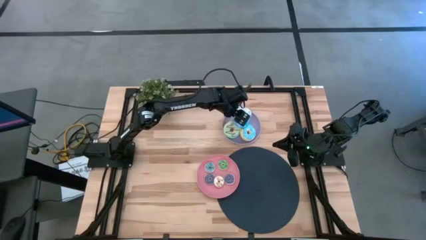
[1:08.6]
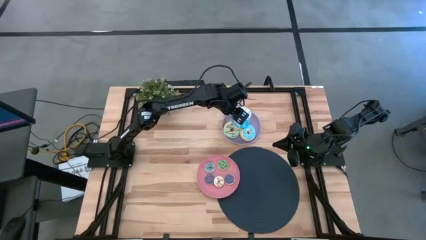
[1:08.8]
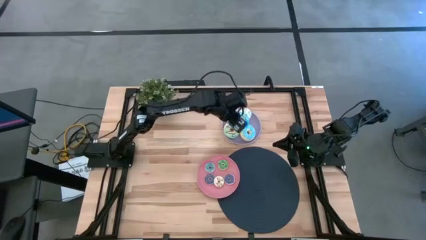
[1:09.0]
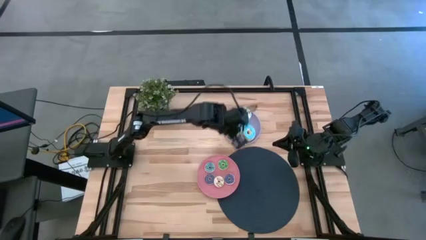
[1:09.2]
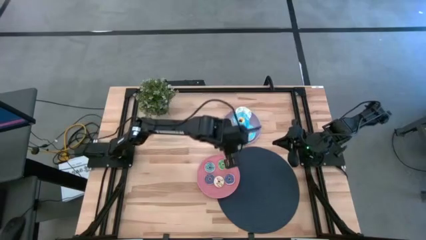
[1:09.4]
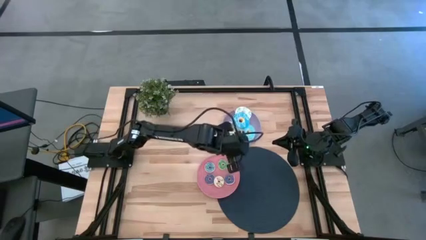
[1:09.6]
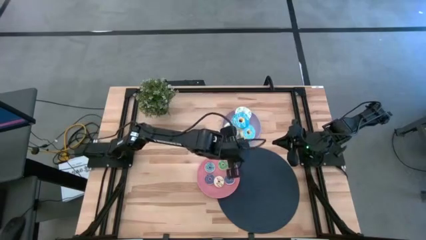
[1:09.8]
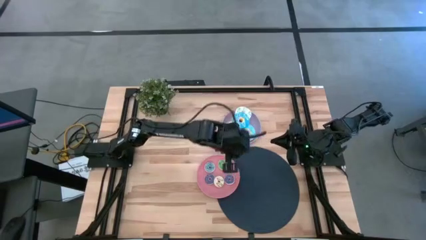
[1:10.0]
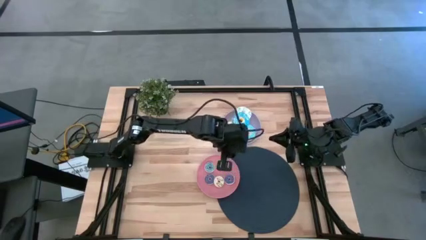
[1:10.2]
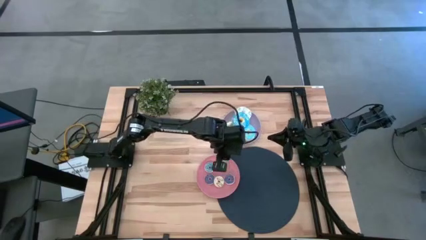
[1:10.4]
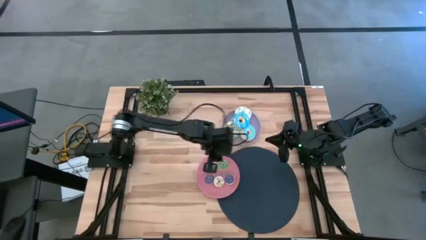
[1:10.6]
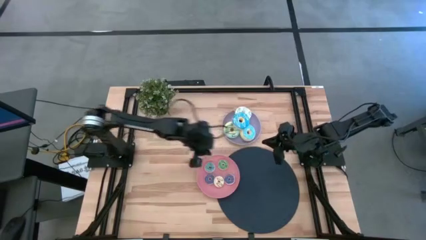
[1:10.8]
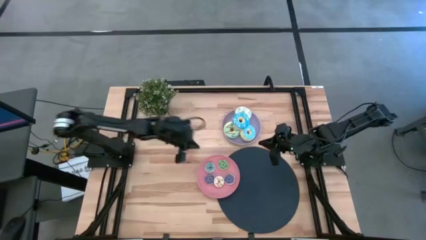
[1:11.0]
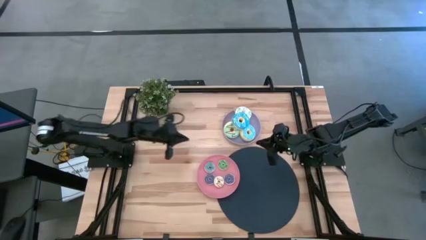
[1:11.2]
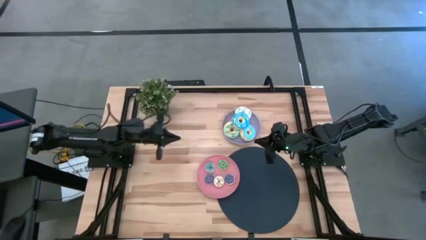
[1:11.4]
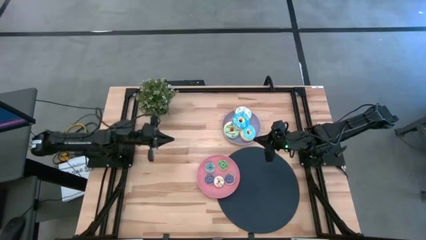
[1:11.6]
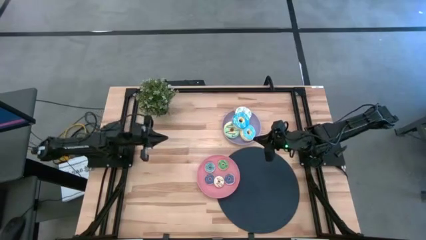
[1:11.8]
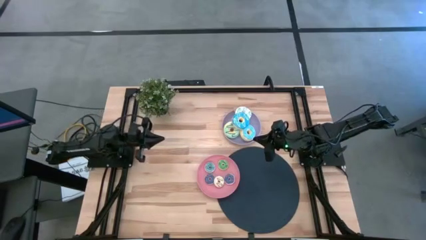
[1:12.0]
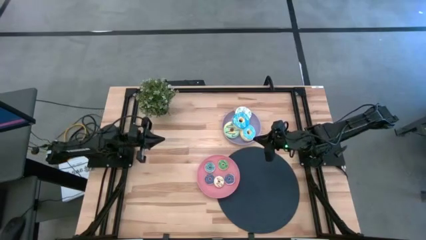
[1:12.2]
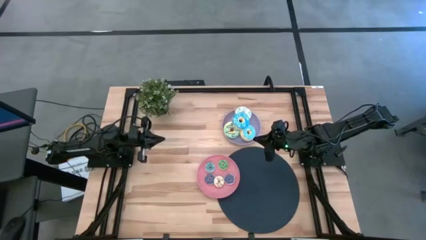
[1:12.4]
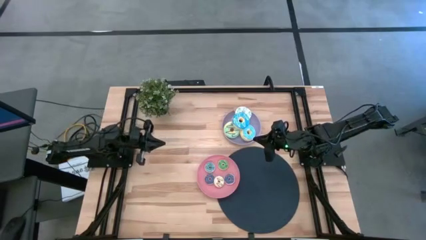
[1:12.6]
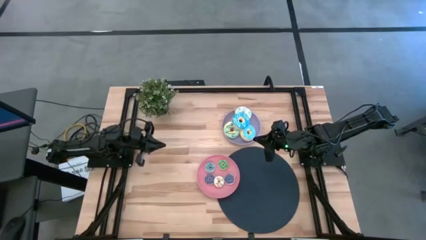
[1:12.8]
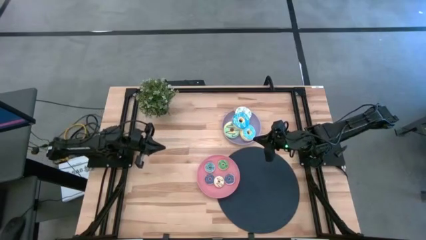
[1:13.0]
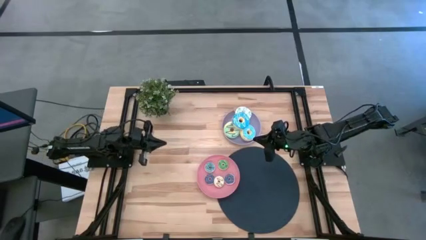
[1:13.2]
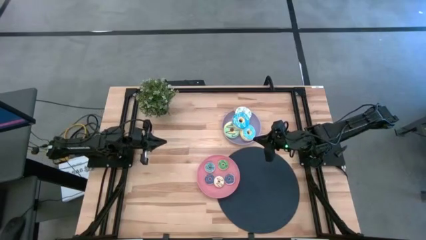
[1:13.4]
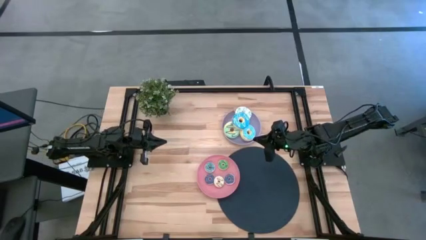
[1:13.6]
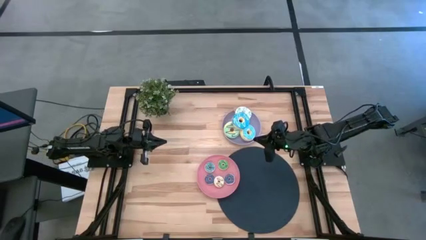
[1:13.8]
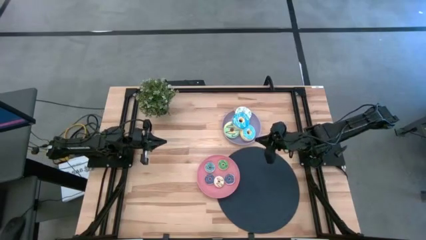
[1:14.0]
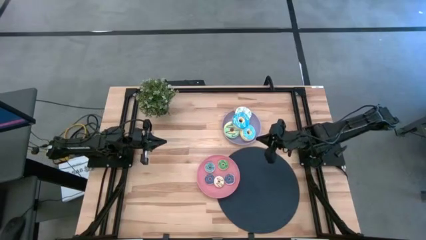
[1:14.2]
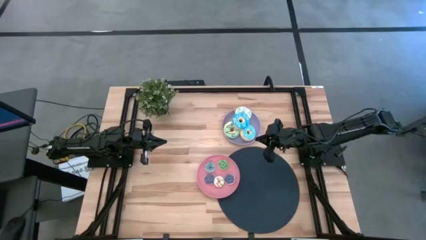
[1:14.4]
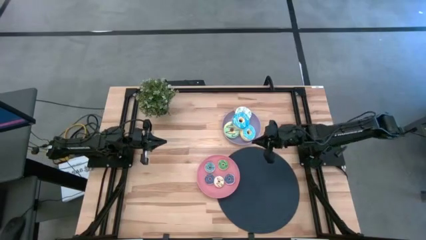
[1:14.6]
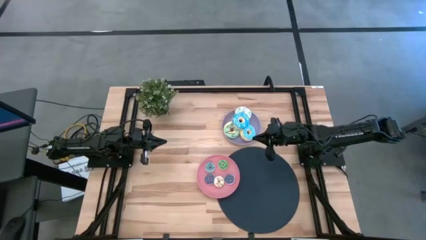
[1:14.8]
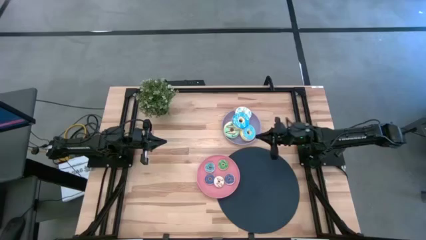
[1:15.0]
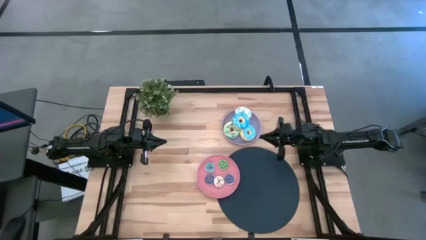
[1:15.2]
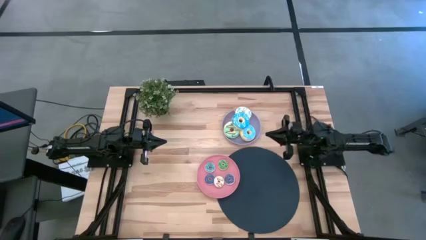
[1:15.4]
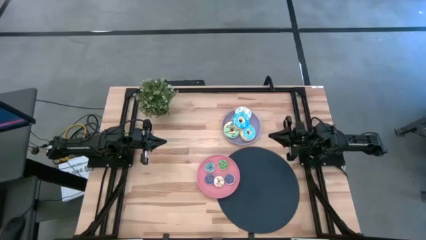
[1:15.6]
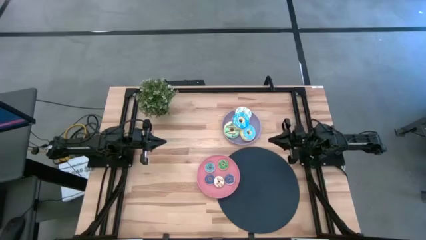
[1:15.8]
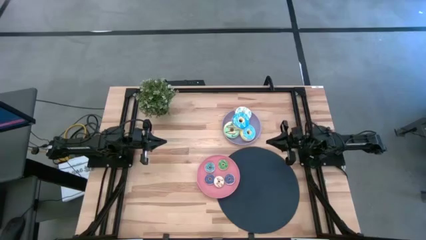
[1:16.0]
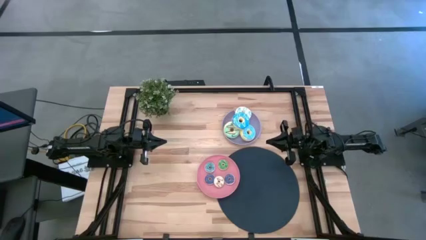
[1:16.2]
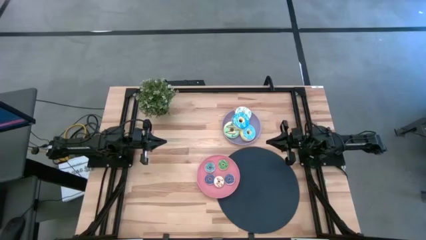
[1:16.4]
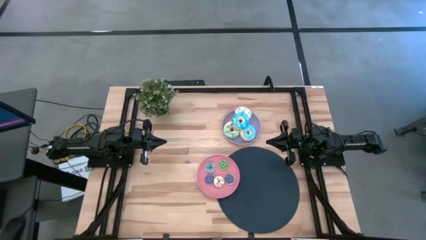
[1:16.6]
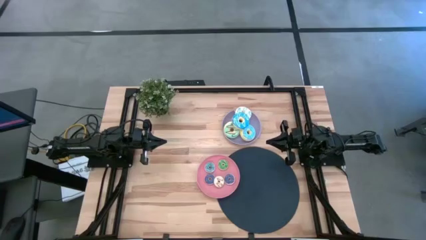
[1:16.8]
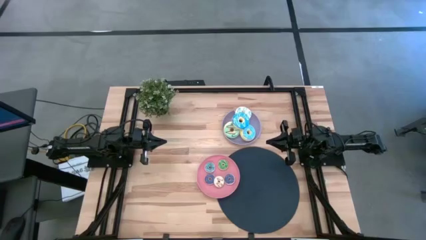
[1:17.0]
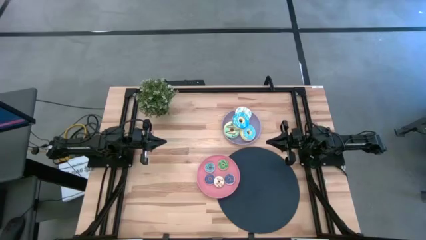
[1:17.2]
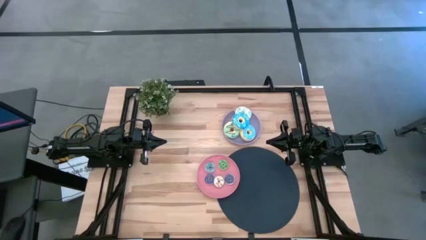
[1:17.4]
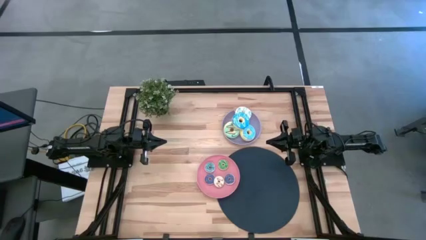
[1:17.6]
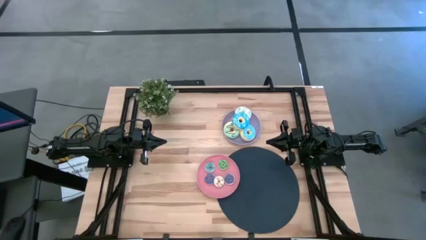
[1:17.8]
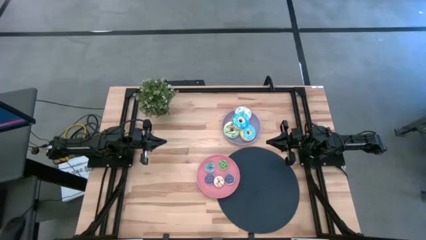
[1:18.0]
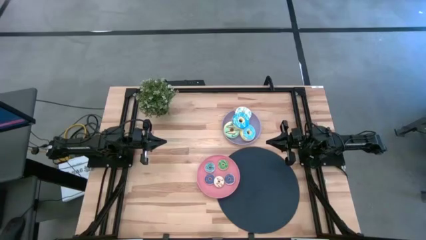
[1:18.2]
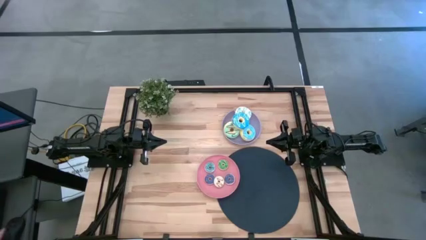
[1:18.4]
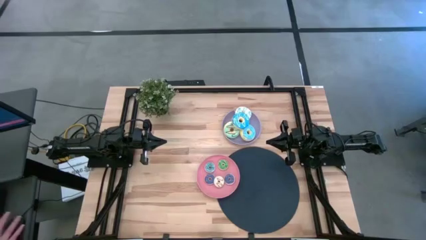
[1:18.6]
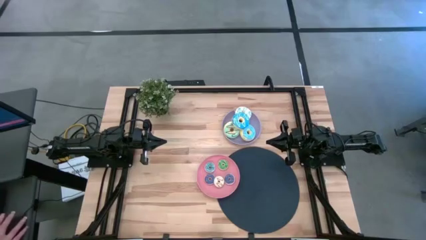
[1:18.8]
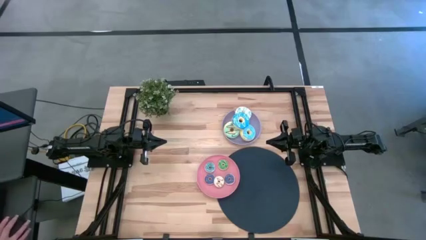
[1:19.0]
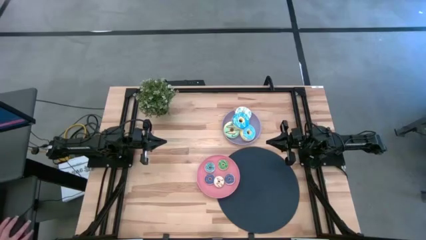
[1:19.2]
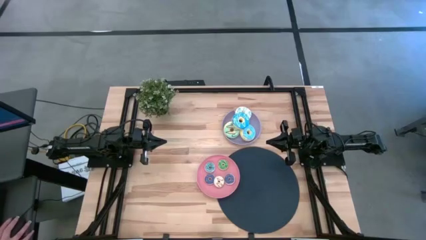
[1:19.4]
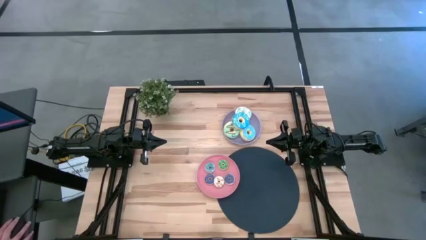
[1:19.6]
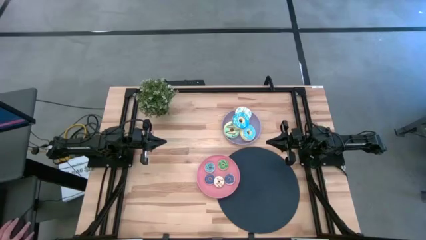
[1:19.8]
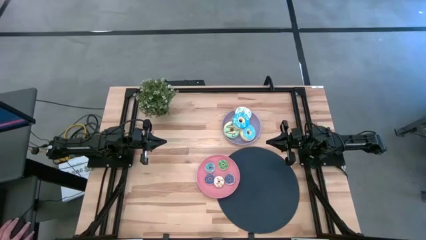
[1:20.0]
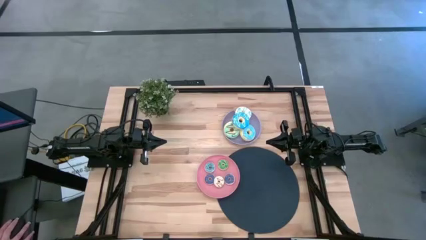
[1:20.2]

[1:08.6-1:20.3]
Task: Pick & Place donuts
Return to Home Position

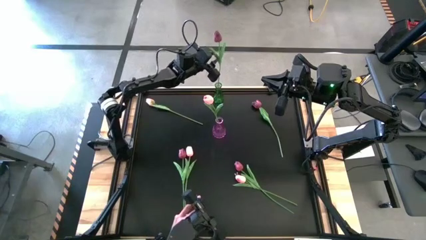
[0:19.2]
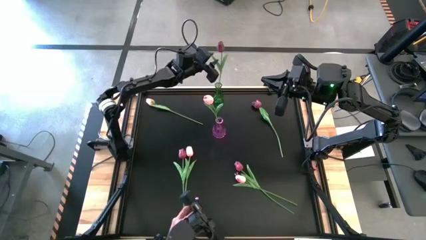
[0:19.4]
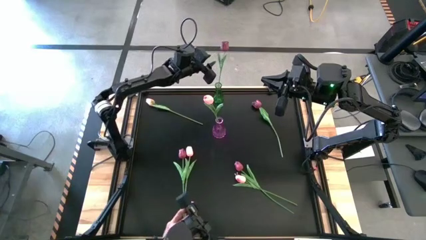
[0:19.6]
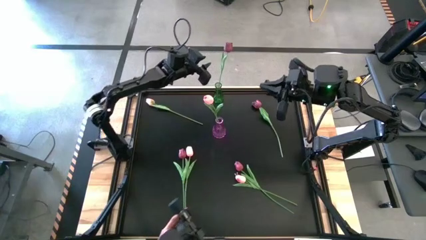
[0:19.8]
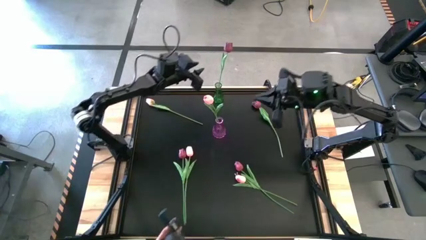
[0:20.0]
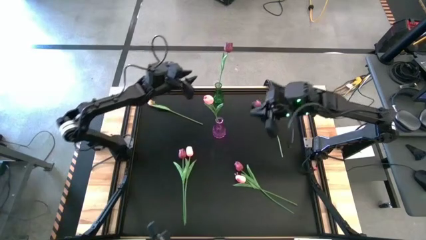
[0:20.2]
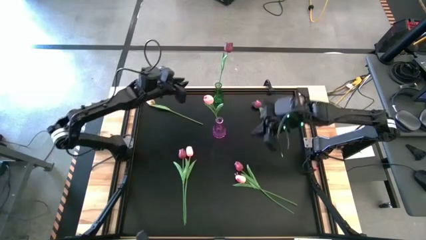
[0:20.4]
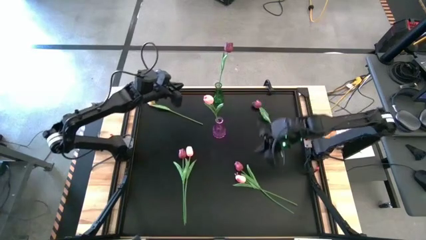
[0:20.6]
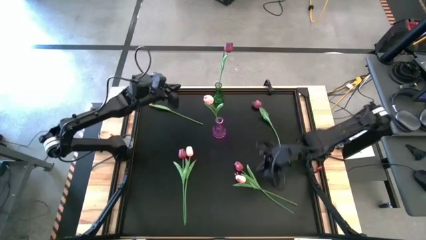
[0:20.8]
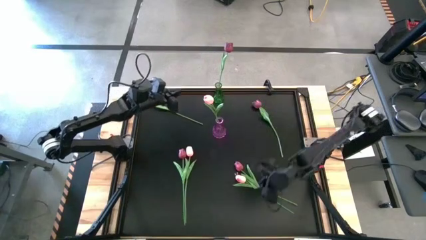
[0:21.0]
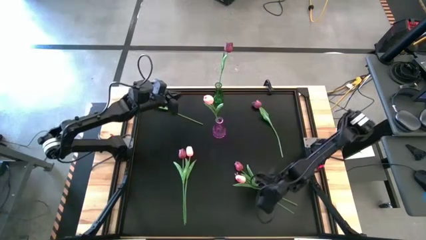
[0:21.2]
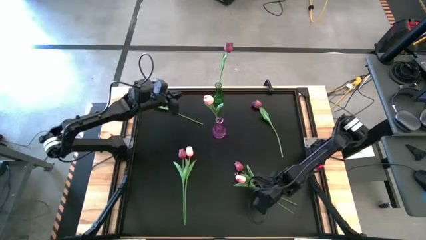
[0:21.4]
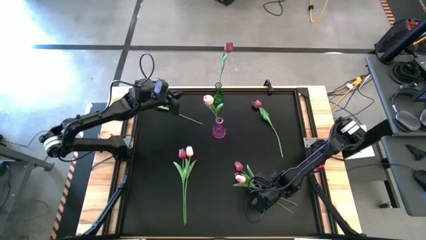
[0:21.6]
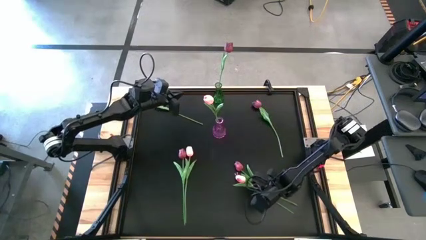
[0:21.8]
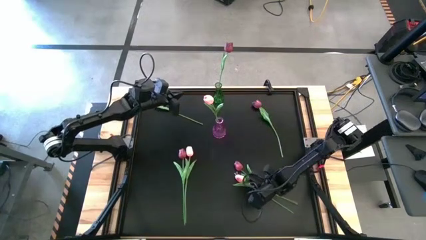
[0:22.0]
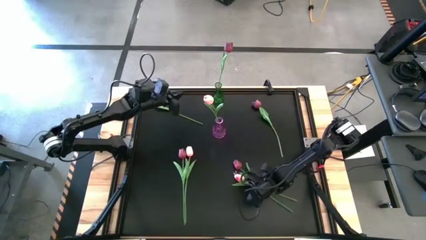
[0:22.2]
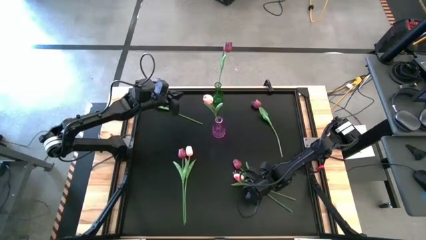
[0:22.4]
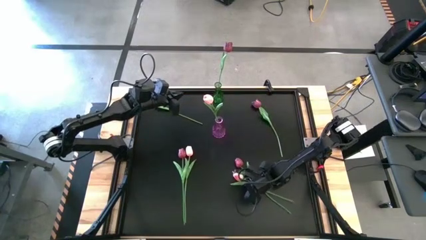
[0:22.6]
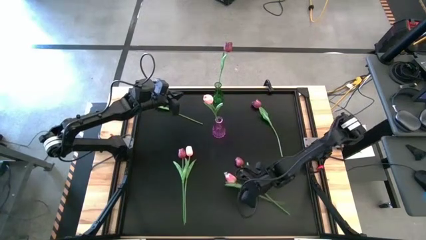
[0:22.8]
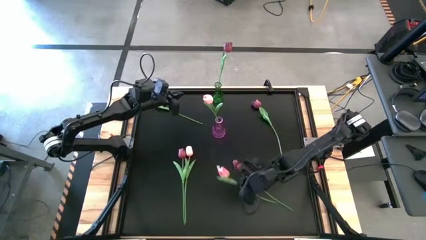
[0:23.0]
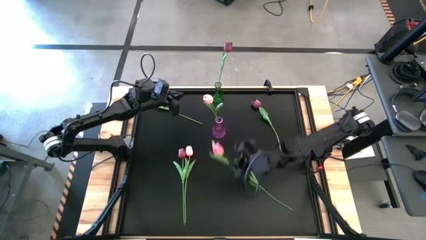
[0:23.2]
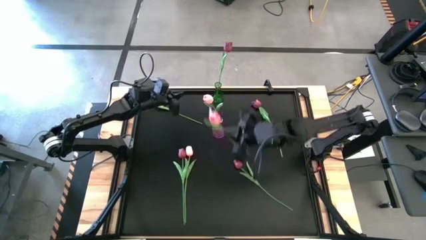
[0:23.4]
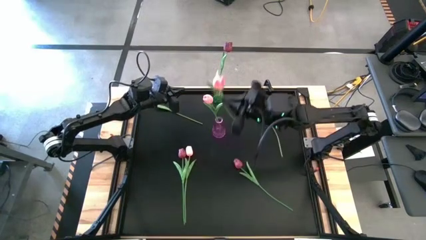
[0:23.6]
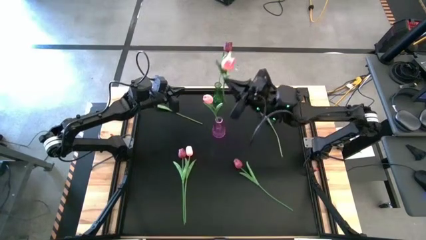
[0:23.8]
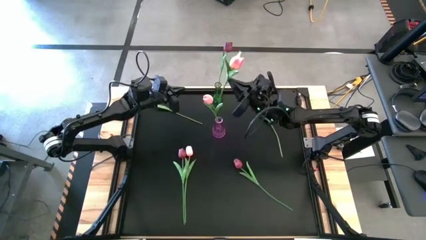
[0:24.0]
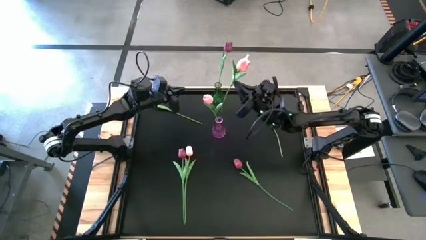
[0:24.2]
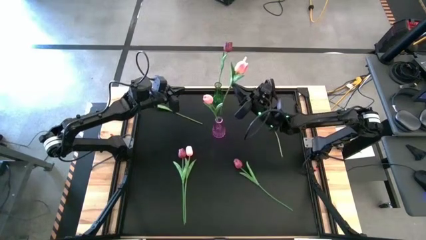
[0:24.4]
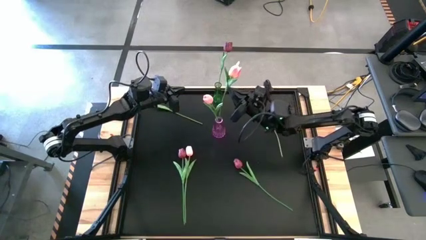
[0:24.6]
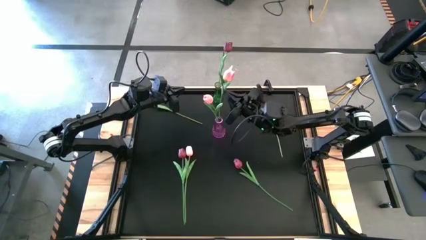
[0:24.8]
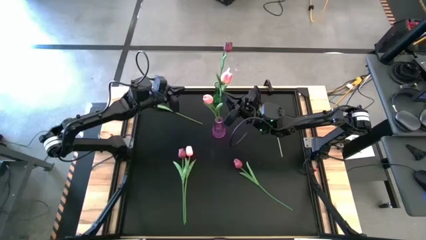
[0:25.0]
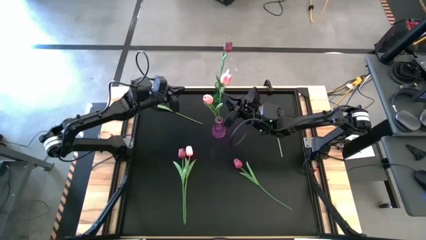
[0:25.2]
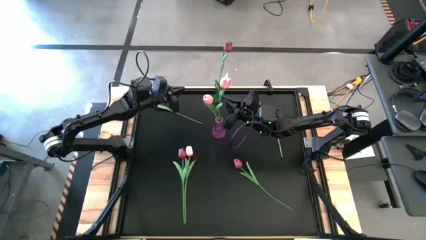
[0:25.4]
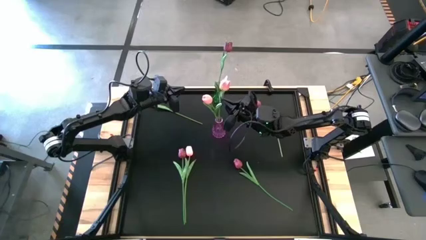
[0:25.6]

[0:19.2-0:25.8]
Task: Sort flowers into vase by color
Put the bottom right pink tulip into the purple vase
